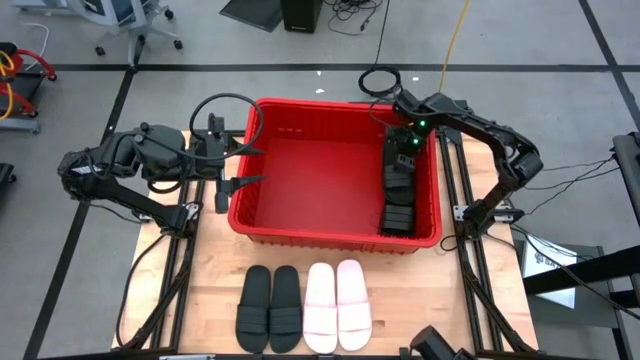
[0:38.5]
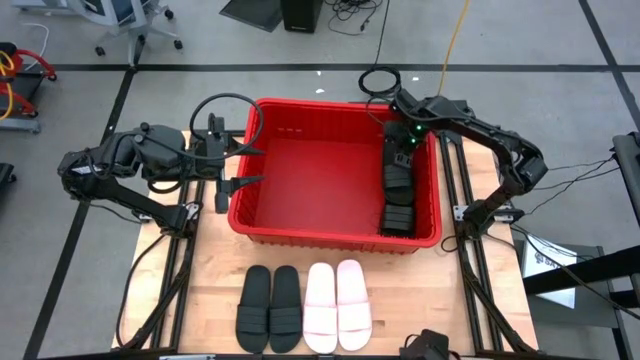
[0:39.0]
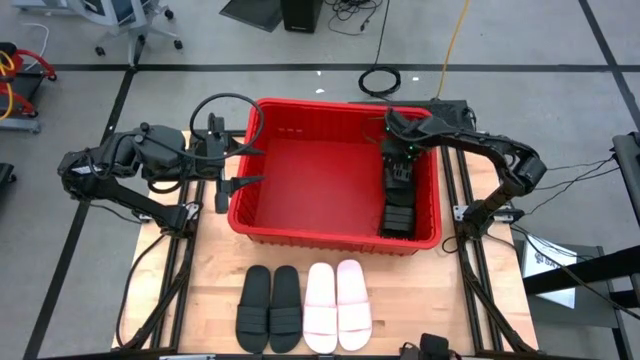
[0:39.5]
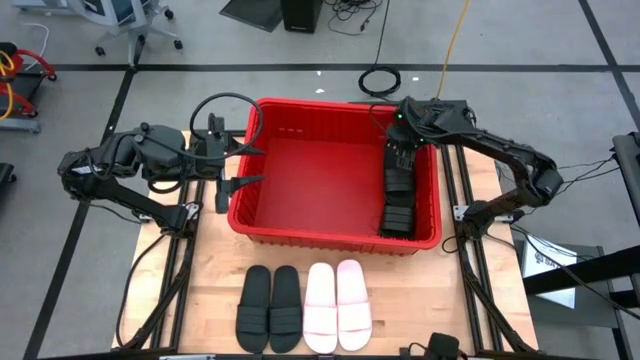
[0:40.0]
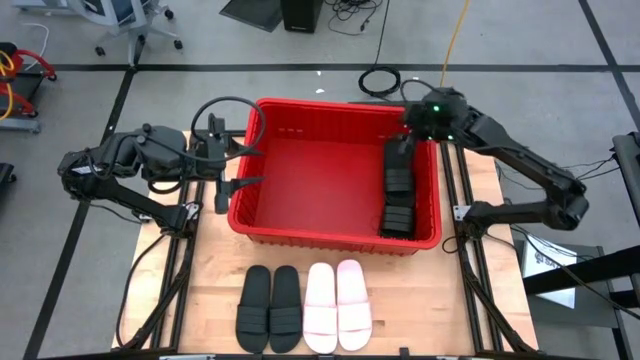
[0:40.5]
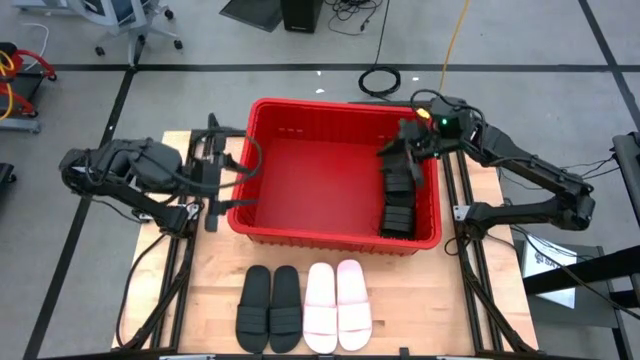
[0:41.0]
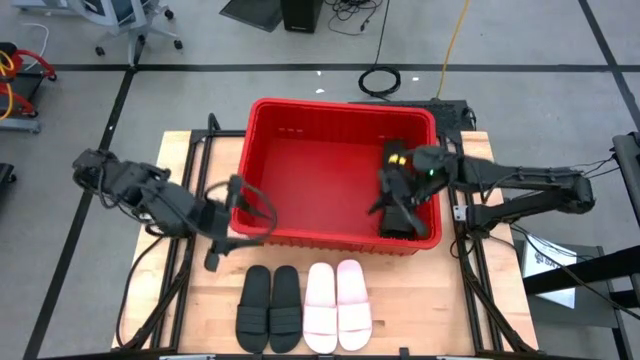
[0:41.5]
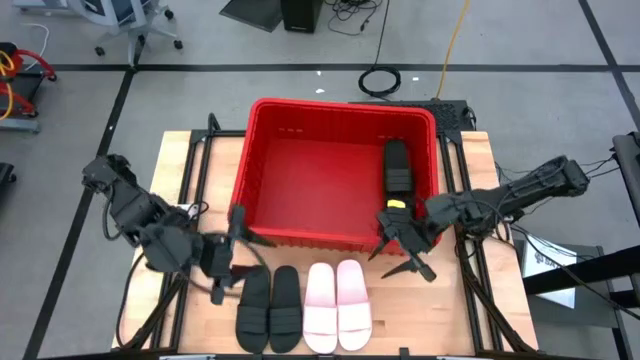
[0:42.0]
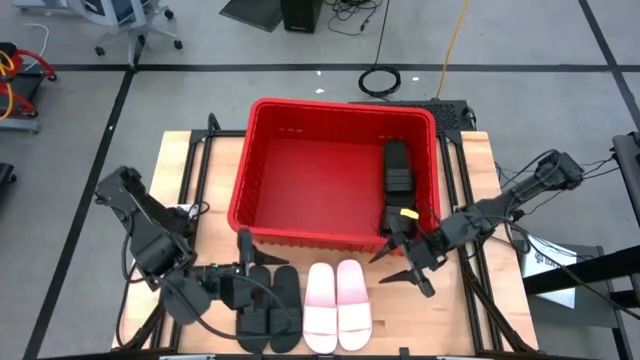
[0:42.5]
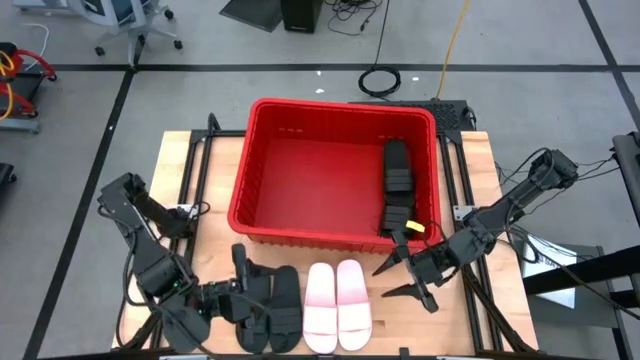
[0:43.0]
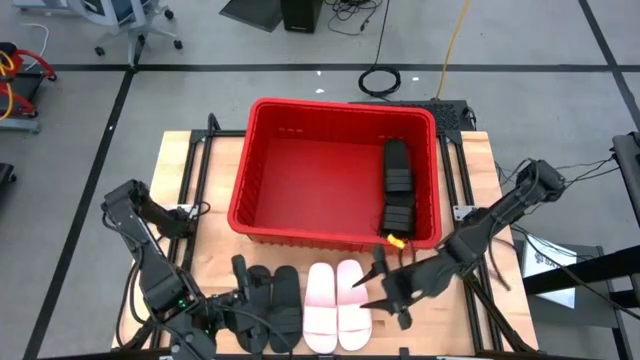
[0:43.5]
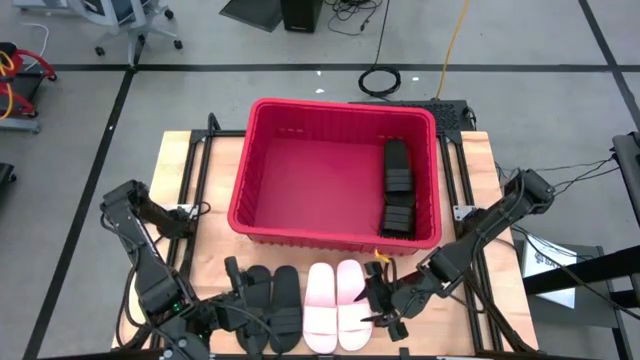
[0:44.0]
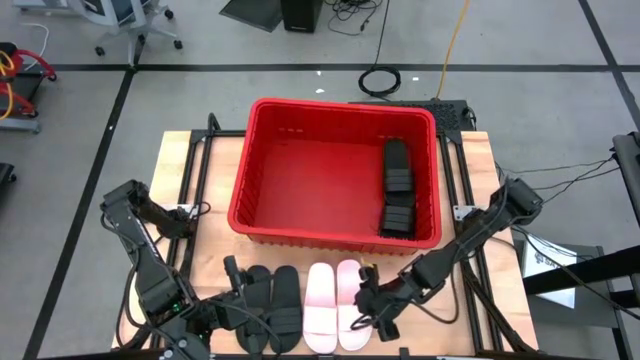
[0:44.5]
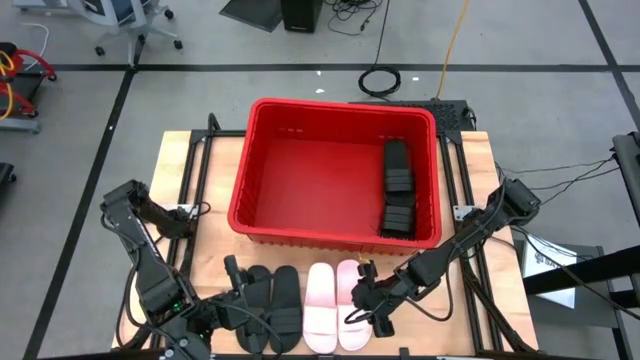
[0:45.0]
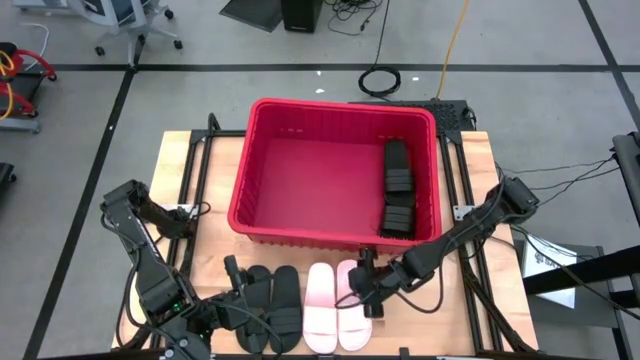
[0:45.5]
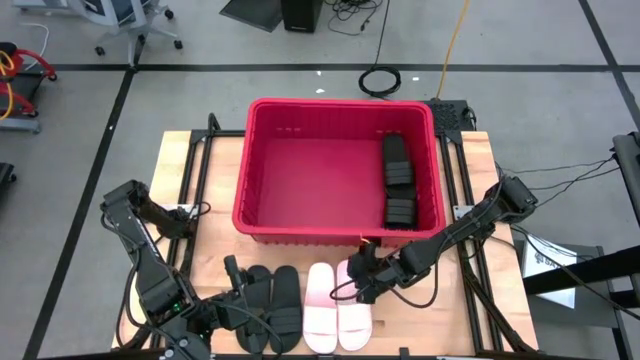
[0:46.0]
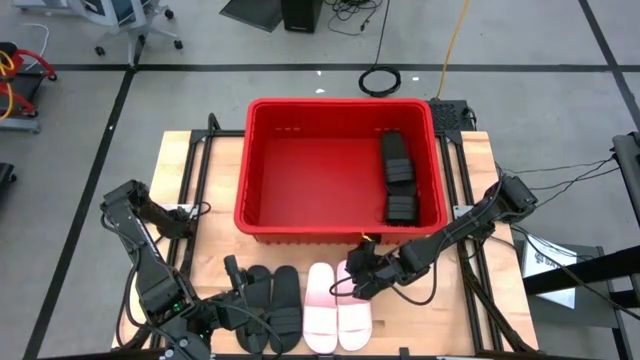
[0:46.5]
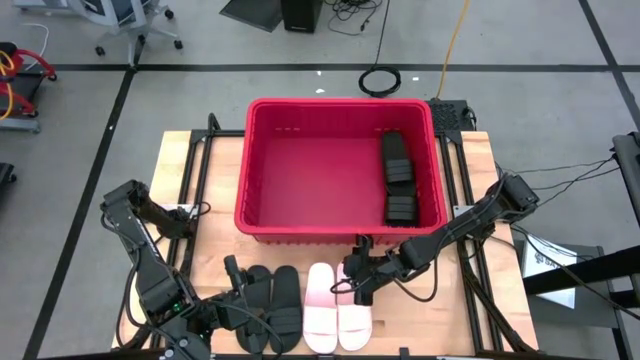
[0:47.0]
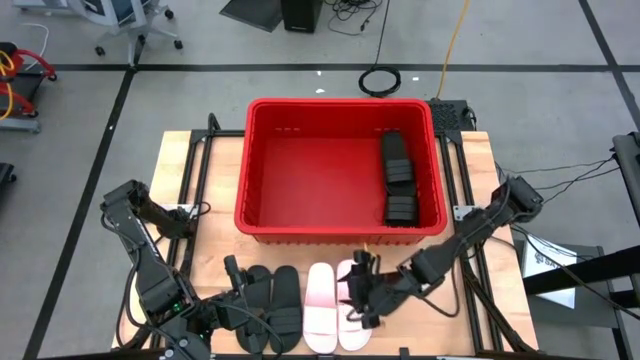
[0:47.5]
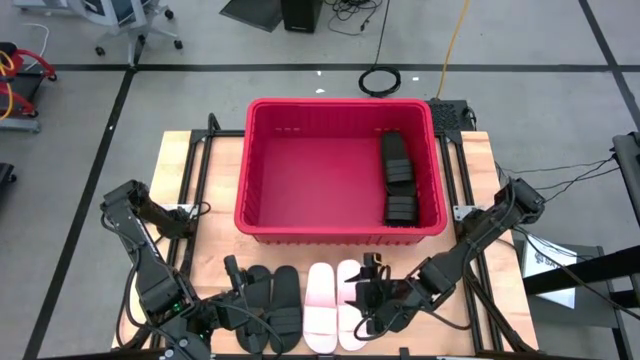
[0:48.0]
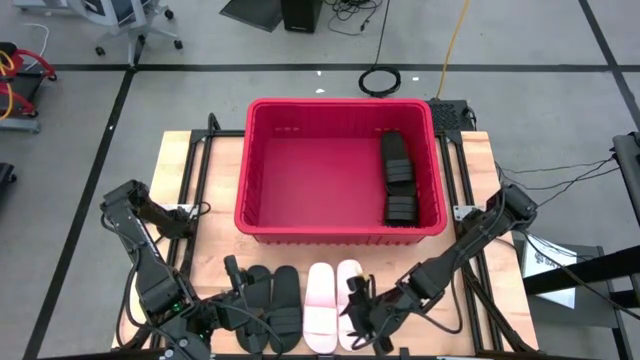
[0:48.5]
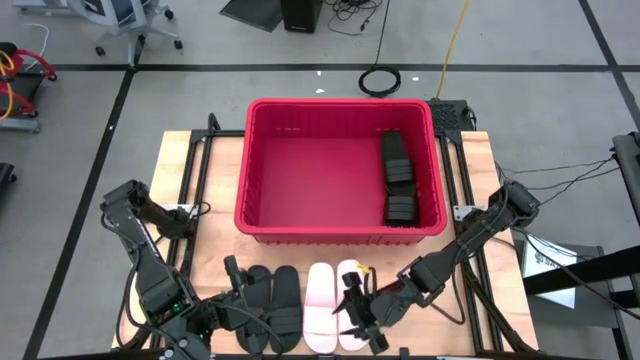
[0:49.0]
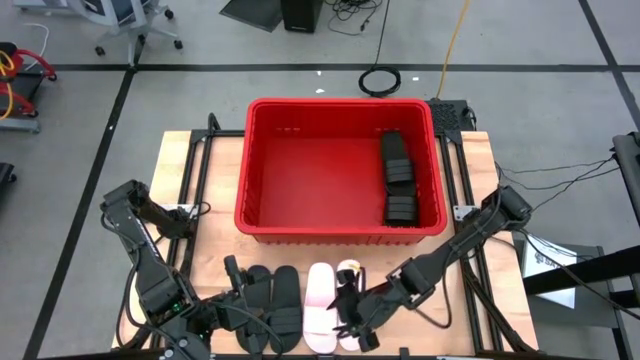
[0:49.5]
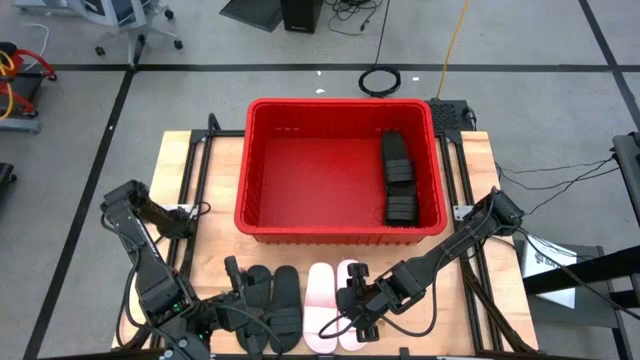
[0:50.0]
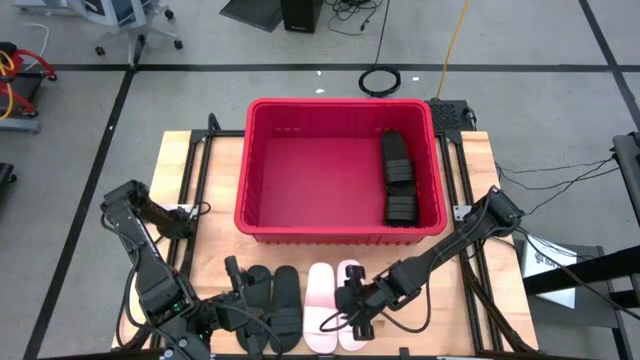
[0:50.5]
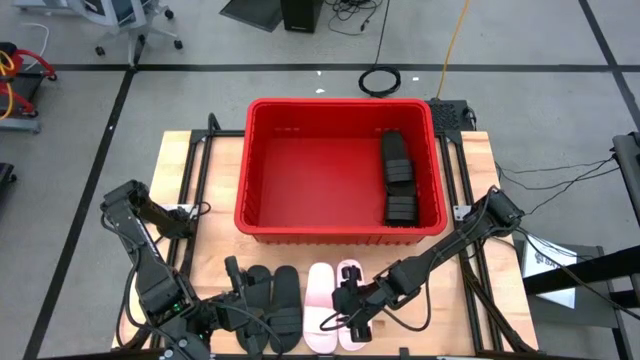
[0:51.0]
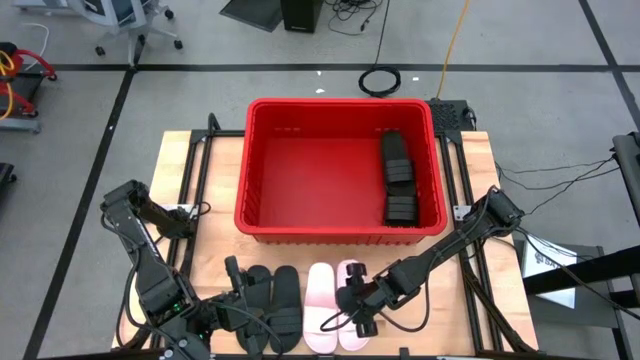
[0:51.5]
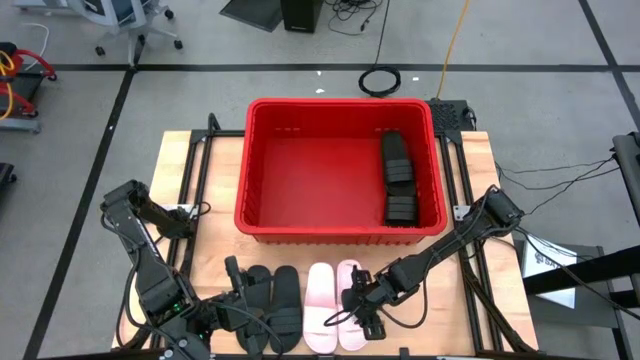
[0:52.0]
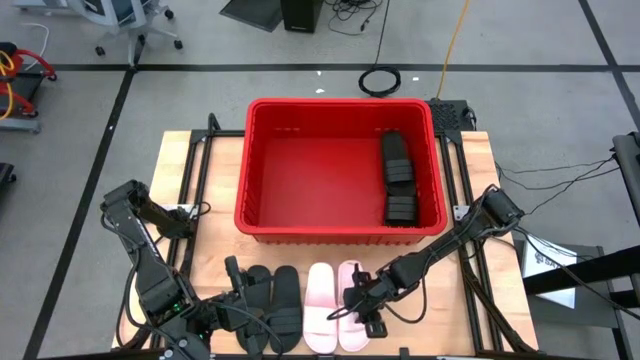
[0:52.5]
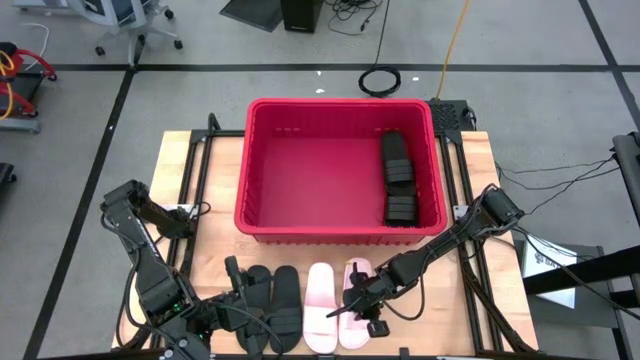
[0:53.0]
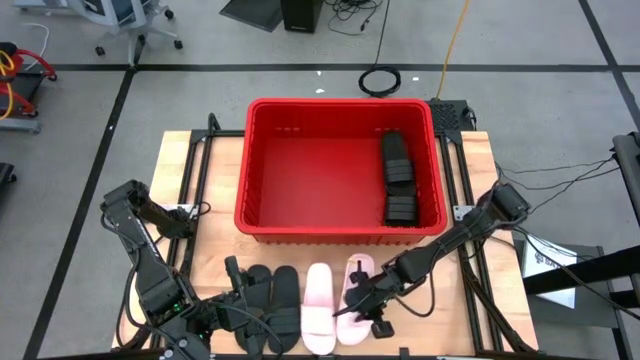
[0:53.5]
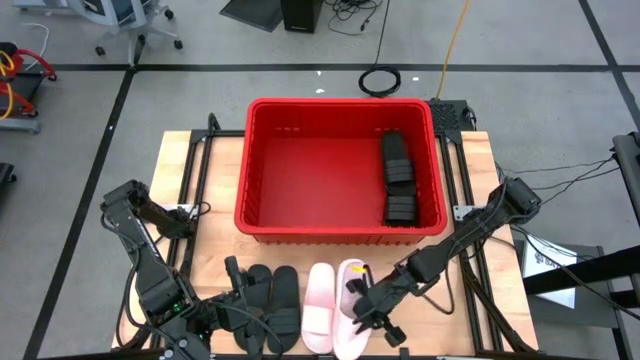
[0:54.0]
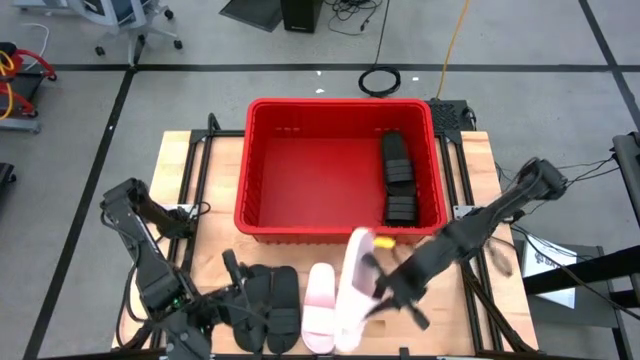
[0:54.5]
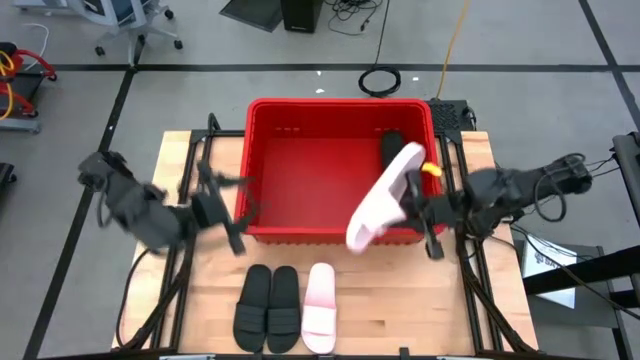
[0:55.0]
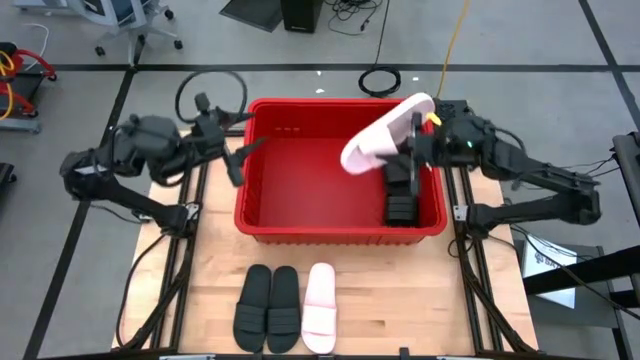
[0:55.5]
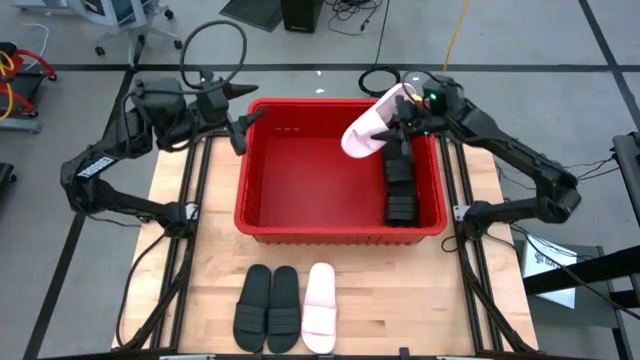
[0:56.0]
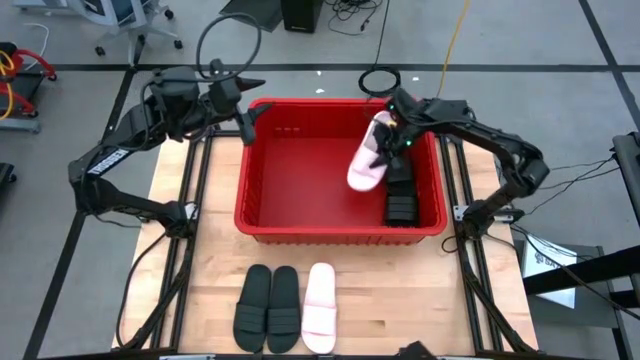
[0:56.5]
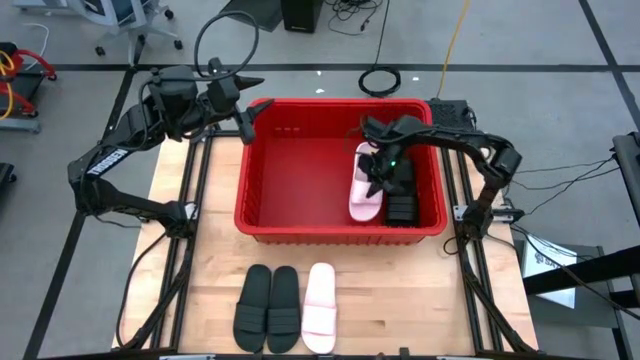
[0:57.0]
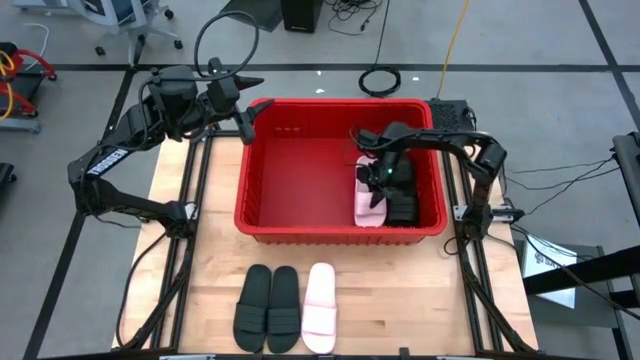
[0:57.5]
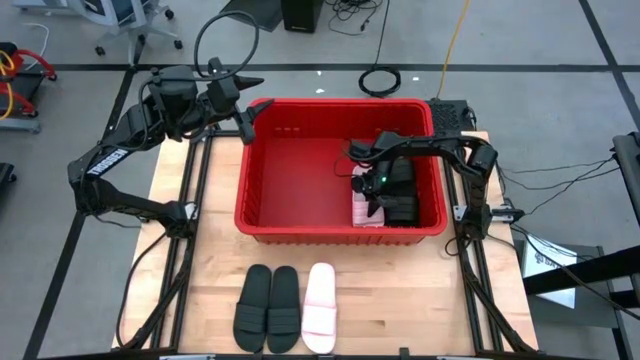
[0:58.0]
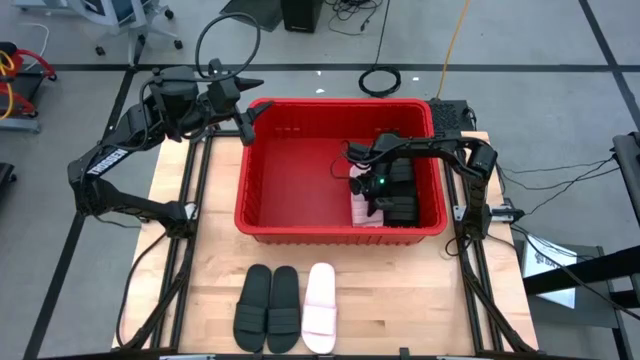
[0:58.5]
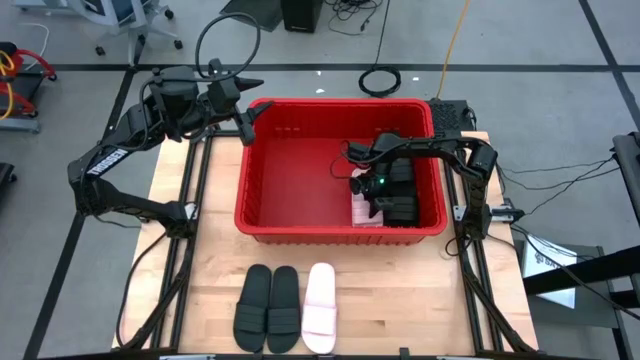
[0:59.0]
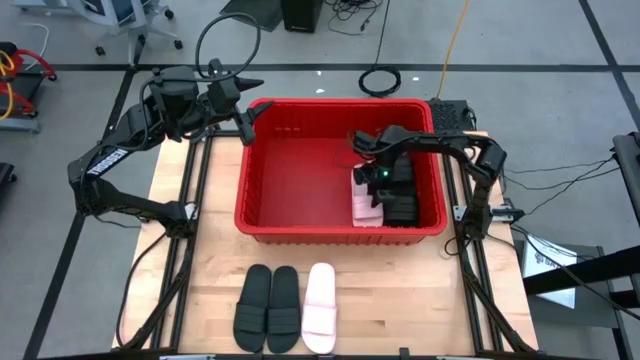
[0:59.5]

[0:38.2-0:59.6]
Task: Pick and place slides into bin
Put the pink slide into the red bin
